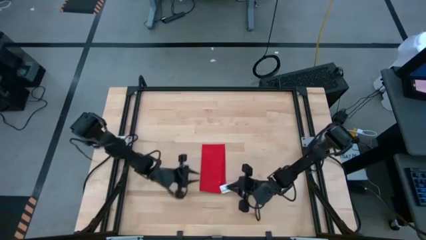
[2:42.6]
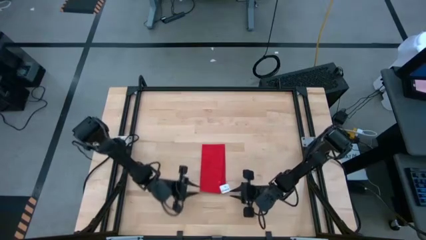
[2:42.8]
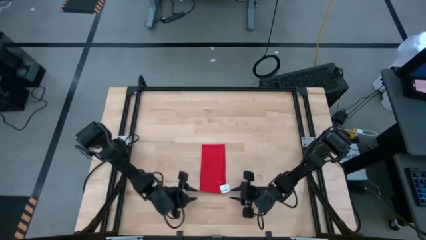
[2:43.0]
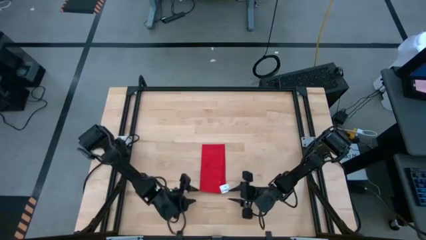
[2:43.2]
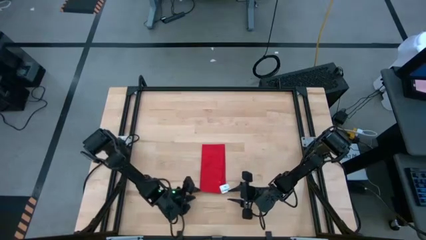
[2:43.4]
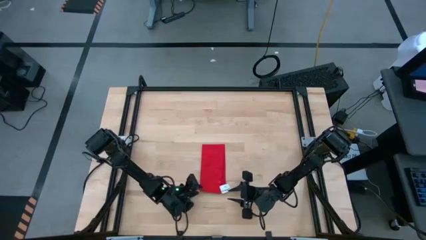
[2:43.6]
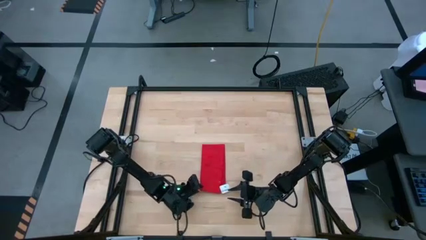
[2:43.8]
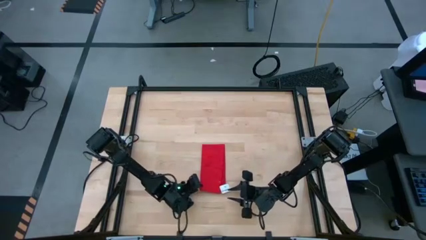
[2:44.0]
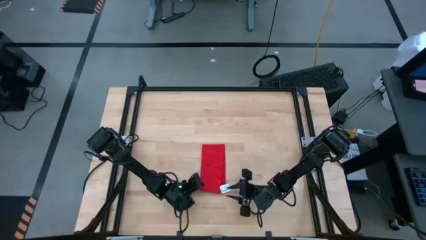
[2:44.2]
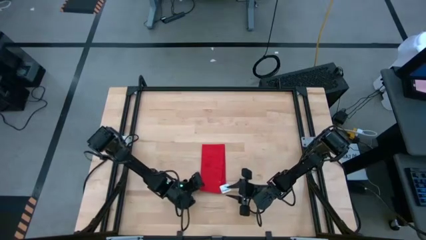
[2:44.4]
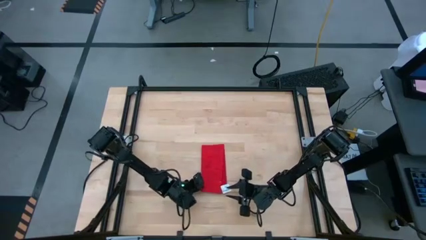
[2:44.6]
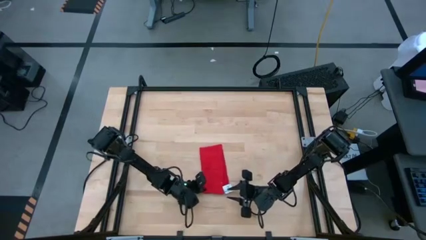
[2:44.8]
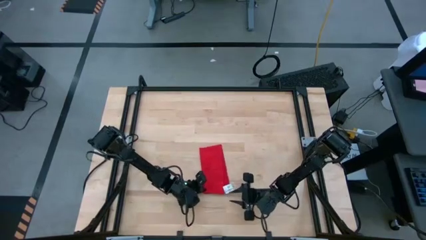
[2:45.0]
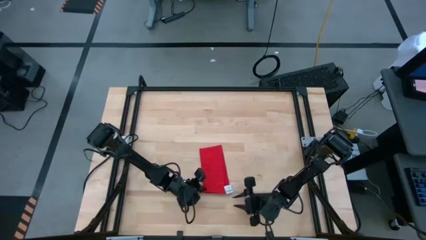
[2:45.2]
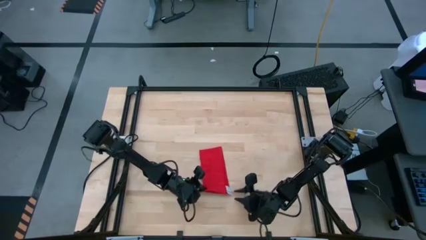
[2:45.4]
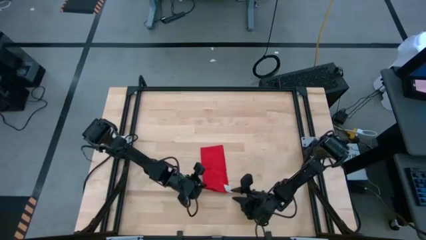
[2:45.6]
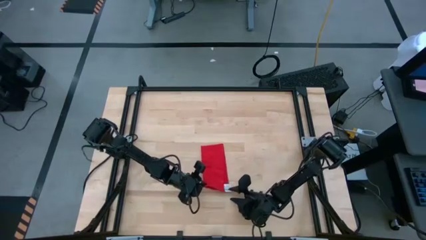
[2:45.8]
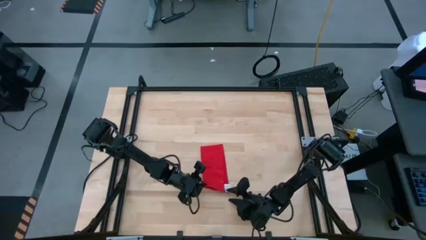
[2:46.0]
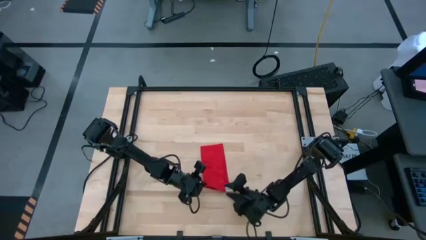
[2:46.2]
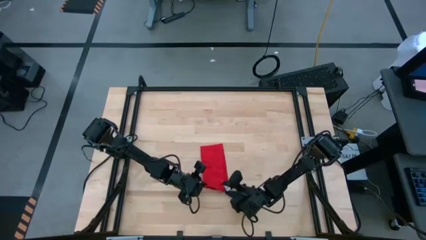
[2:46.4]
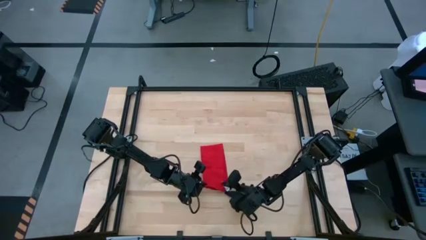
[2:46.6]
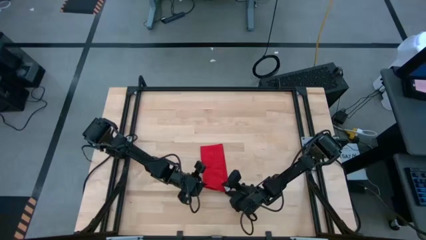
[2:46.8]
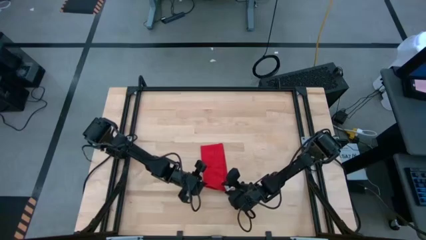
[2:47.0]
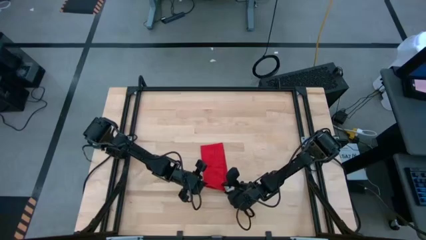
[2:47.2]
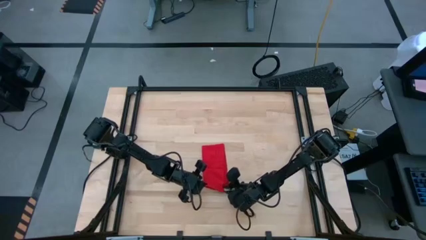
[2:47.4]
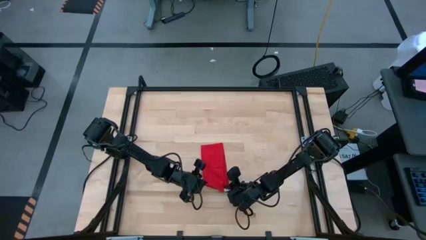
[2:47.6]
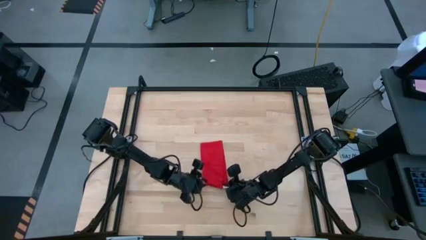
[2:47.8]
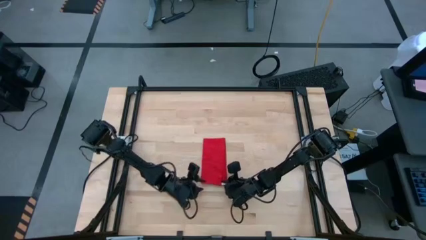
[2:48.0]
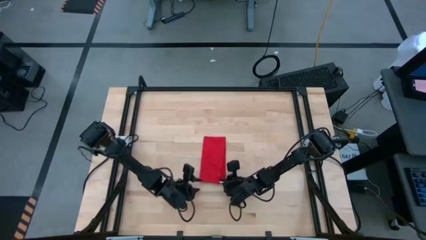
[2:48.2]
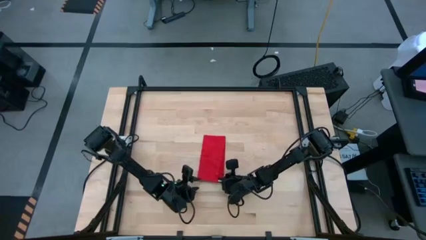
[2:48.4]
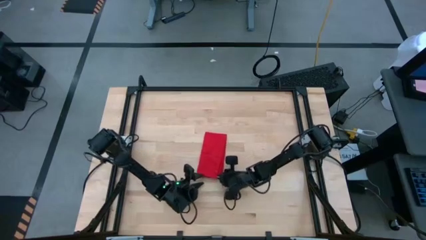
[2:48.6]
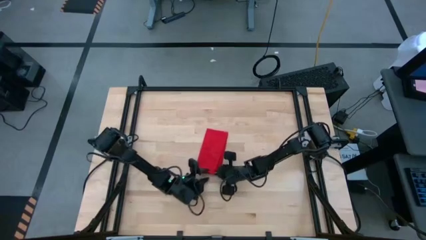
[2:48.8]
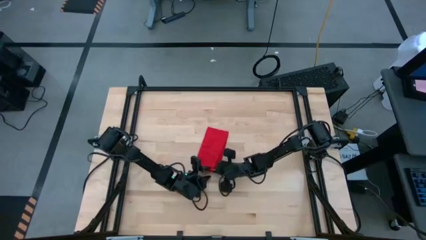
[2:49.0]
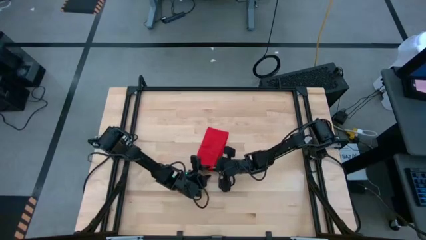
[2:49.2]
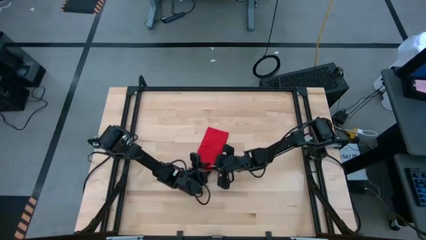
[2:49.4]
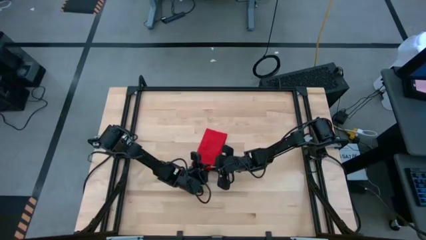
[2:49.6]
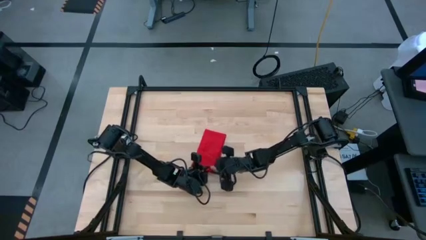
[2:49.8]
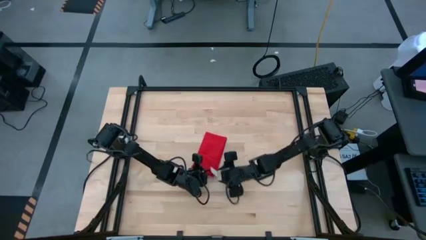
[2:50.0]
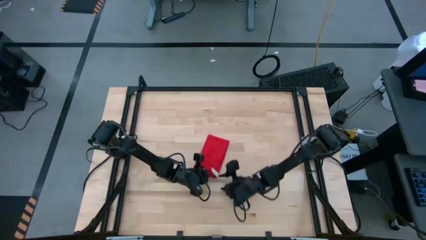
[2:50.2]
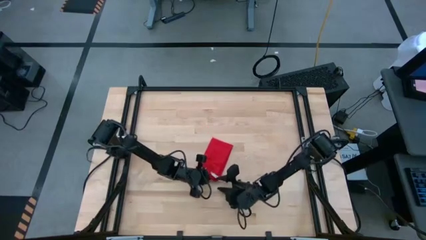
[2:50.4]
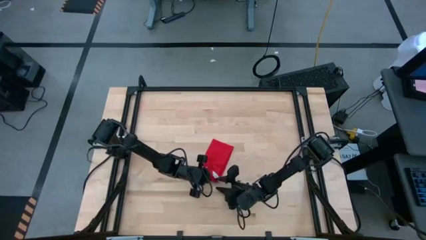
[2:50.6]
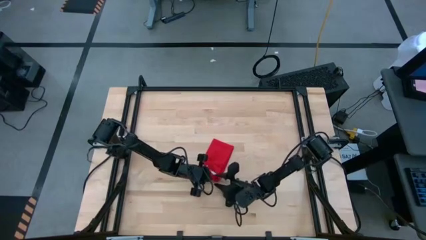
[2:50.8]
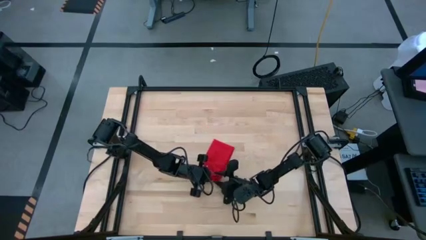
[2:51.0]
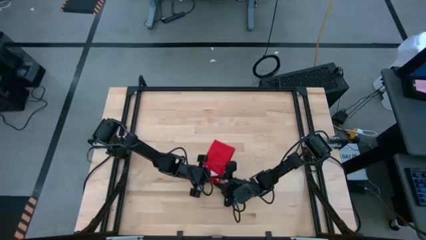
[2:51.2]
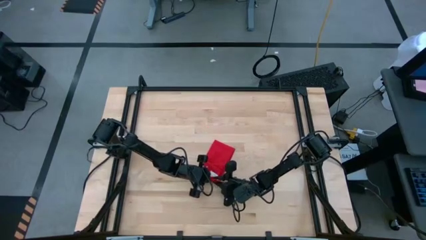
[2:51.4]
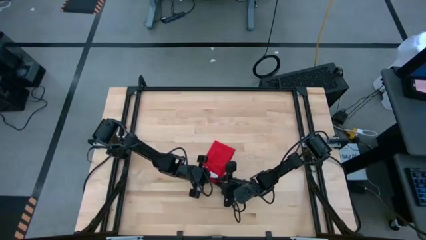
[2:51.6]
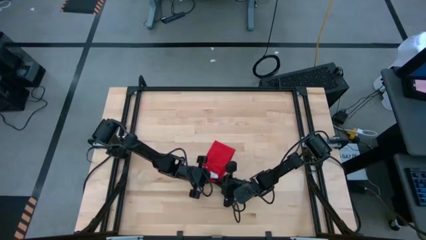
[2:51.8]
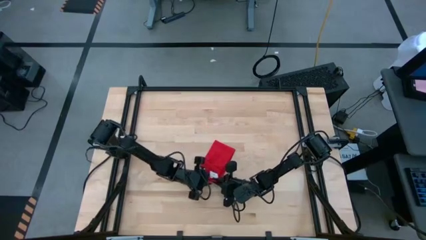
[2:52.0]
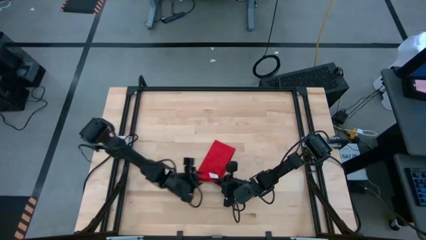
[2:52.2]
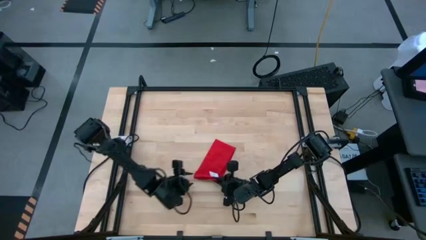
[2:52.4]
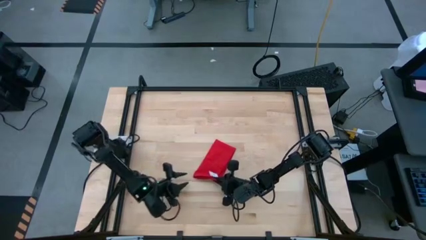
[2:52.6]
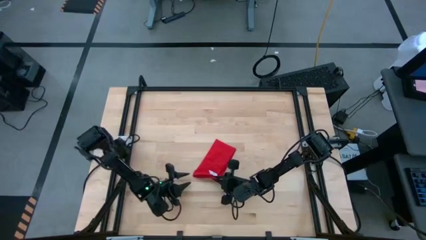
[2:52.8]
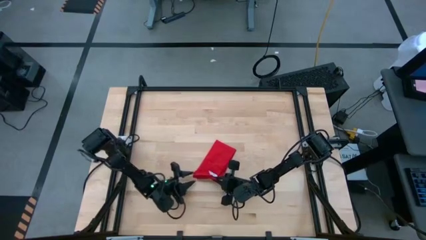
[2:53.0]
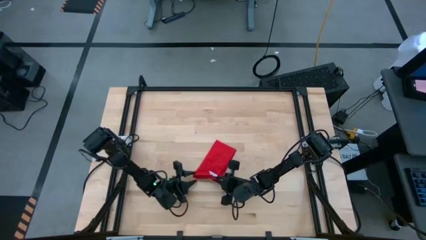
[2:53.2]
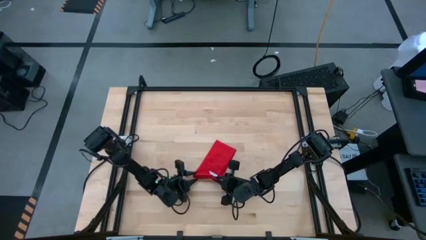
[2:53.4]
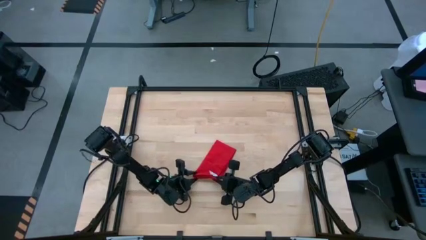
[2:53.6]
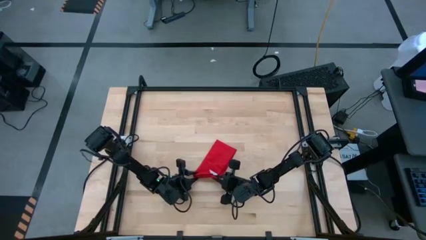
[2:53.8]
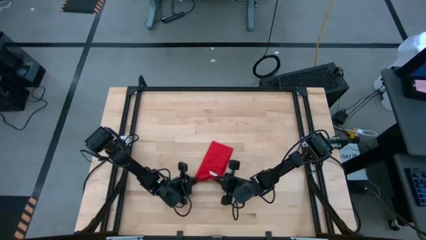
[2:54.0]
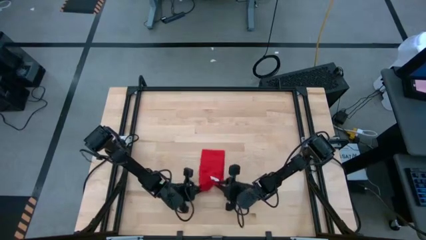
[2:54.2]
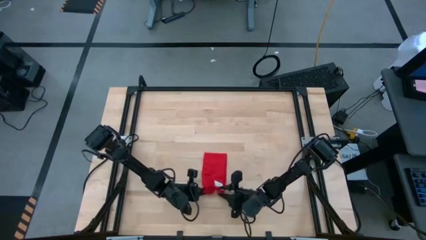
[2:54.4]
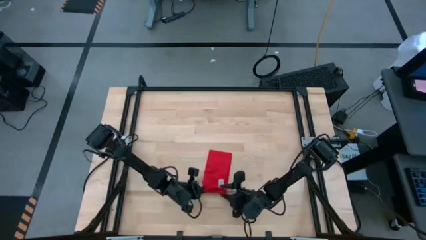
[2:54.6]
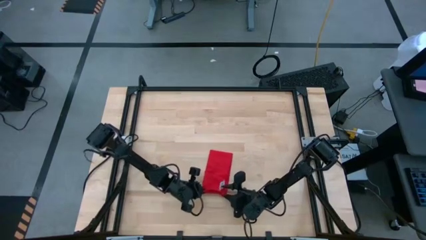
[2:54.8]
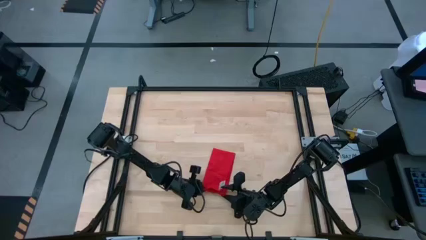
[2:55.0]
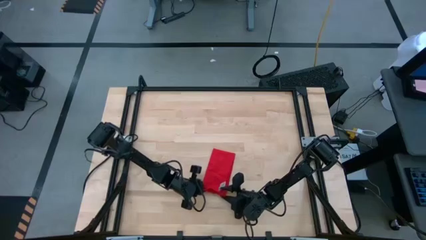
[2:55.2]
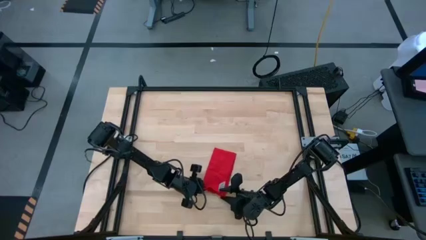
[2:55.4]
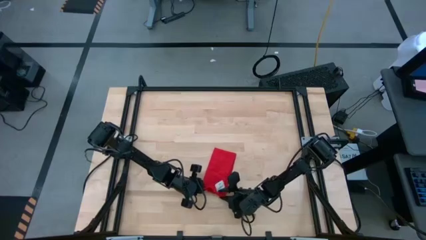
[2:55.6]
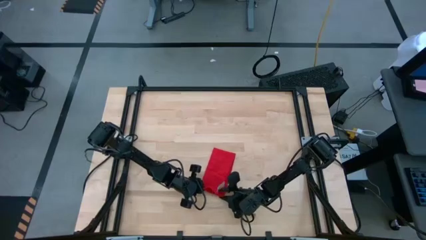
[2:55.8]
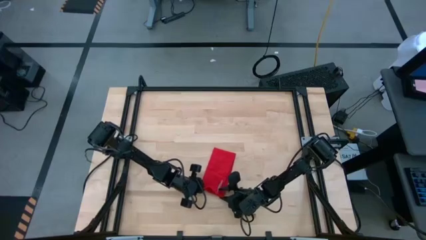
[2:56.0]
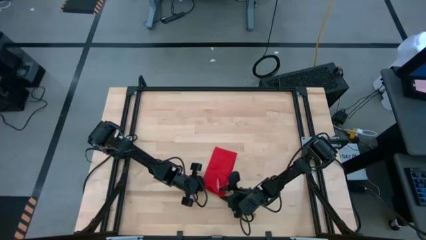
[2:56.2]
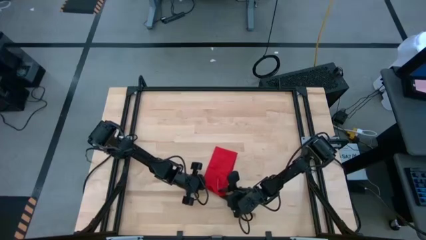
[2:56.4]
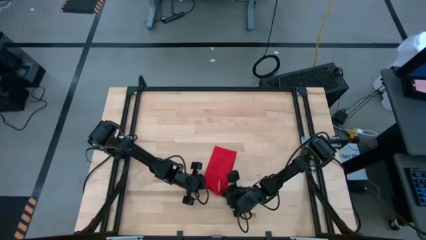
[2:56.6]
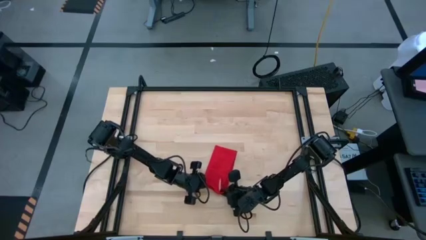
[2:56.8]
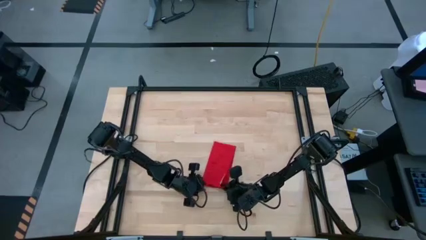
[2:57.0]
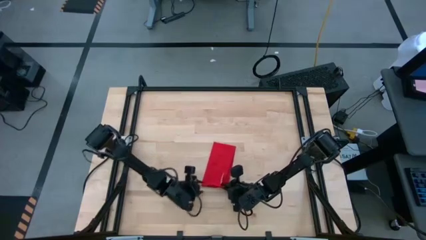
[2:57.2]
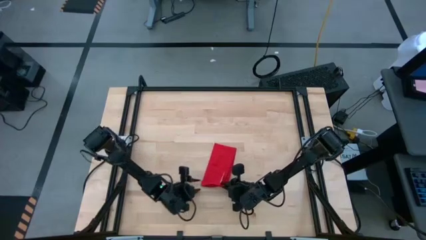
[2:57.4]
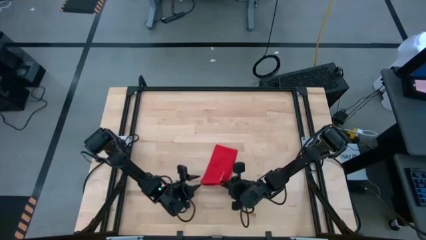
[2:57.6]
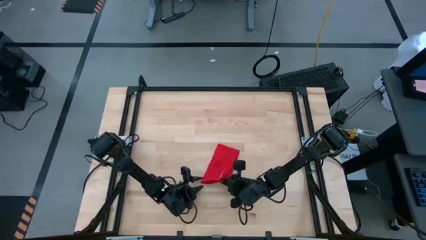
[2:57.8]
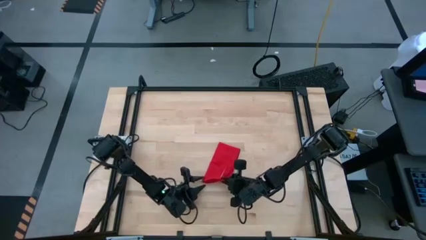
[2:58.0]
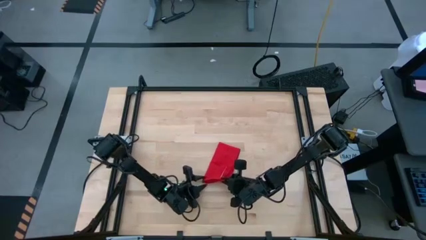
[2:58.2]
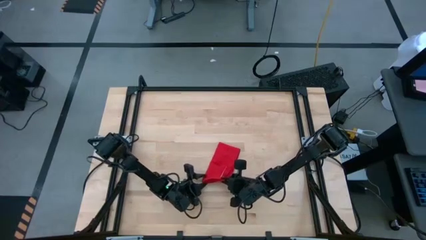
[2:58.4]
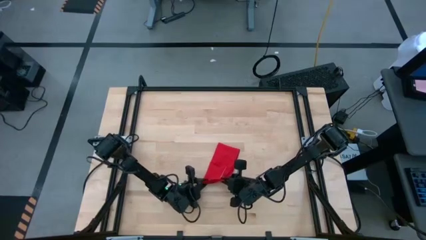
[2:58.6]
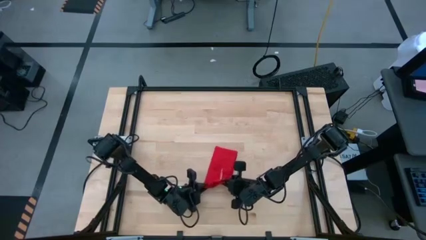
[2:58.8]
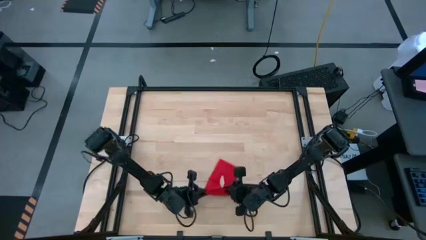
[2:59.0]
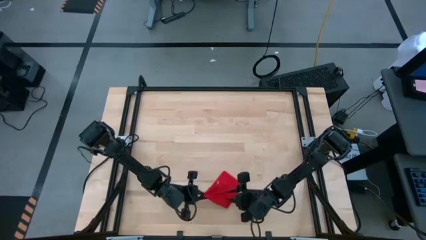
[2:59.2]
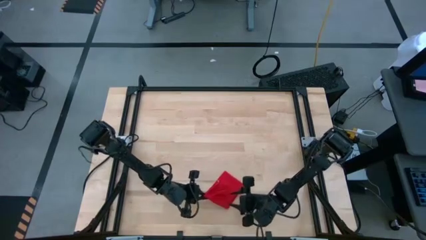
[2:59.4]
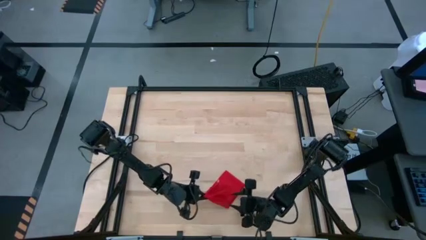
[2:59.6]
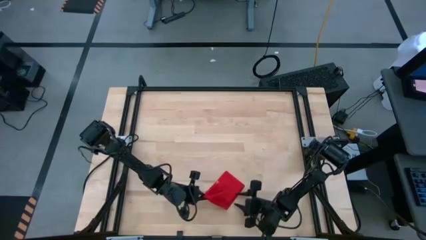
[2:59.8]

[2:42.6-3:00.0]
Task: Roll napkin
Roll the red napkin
